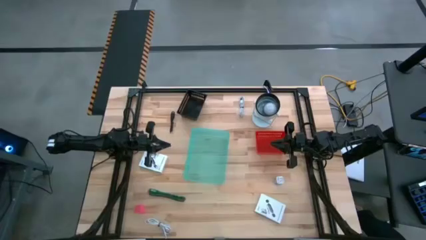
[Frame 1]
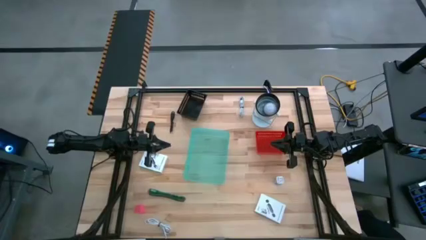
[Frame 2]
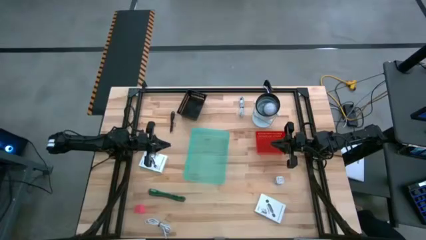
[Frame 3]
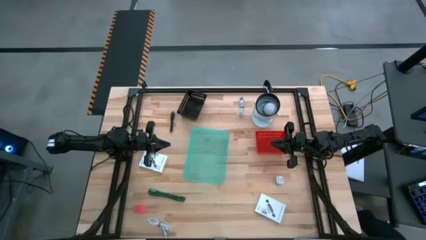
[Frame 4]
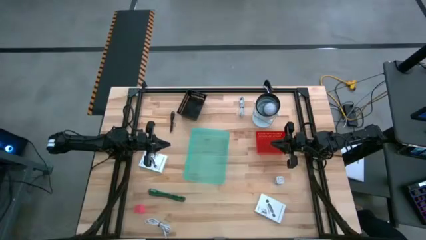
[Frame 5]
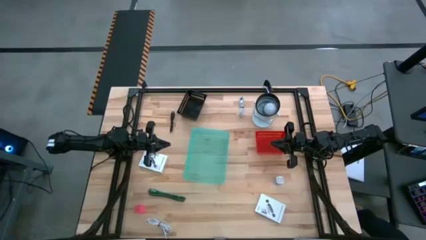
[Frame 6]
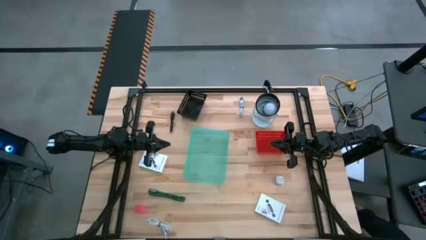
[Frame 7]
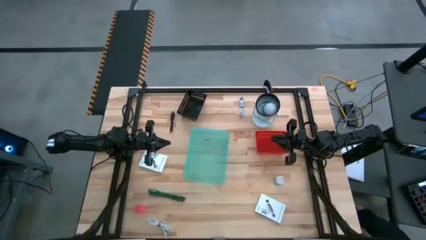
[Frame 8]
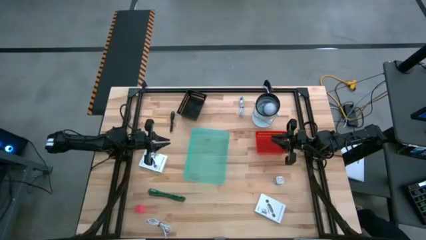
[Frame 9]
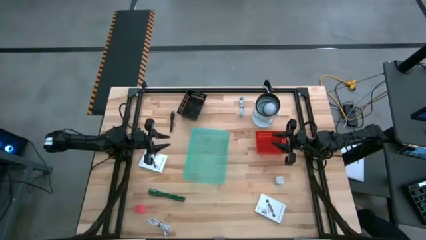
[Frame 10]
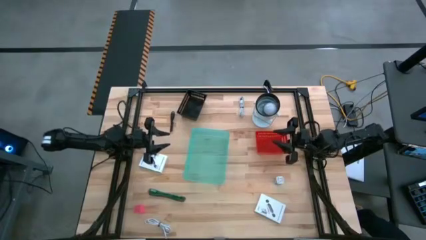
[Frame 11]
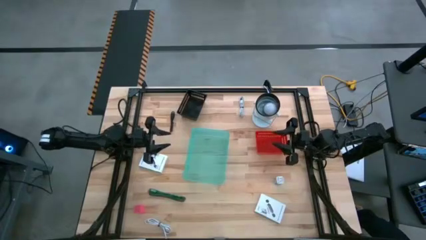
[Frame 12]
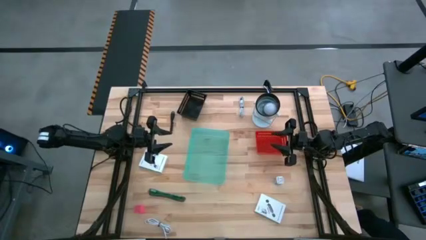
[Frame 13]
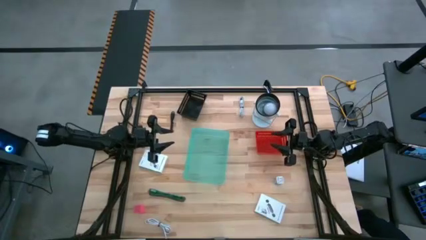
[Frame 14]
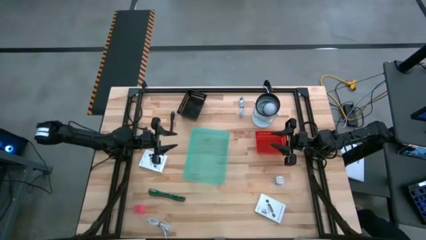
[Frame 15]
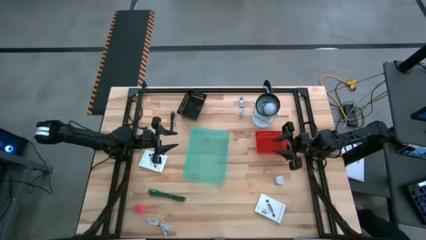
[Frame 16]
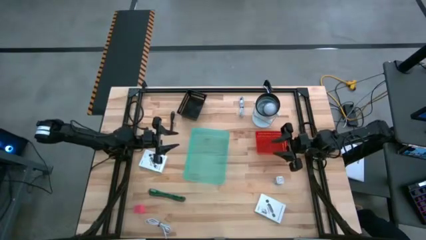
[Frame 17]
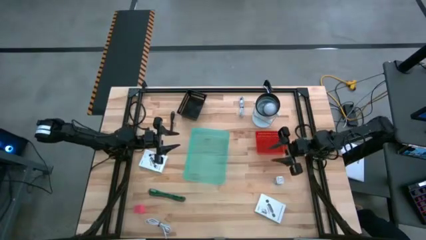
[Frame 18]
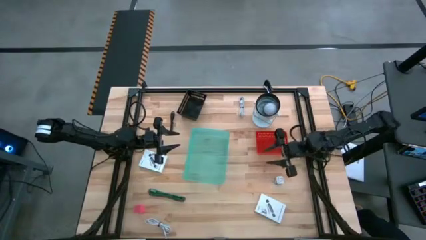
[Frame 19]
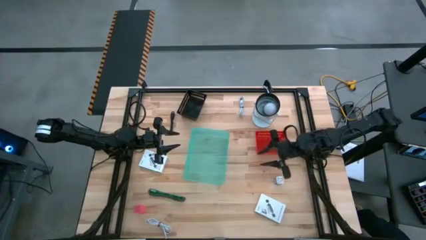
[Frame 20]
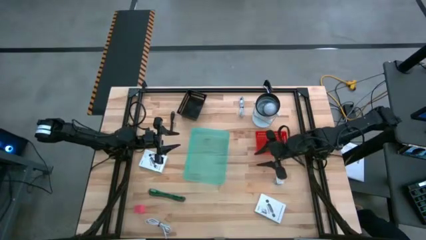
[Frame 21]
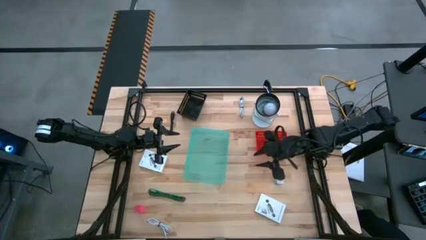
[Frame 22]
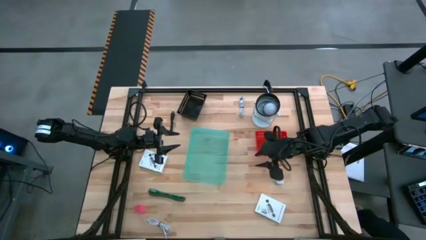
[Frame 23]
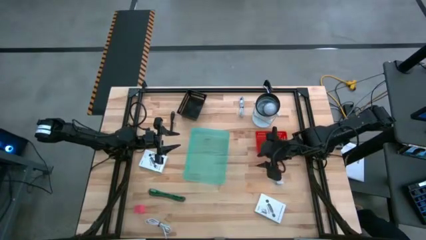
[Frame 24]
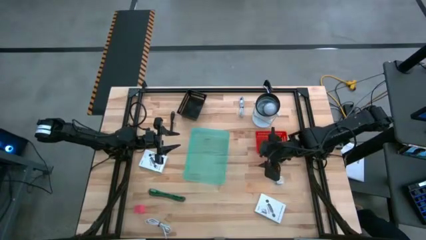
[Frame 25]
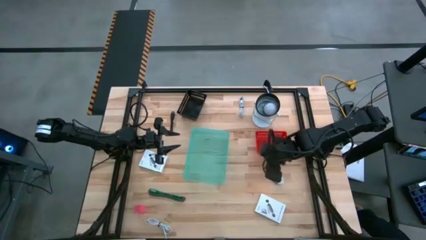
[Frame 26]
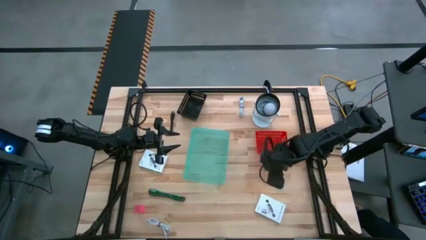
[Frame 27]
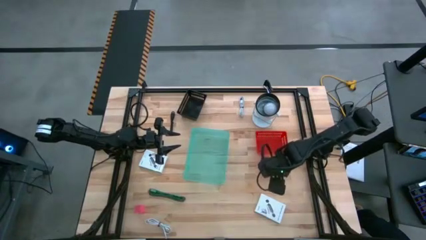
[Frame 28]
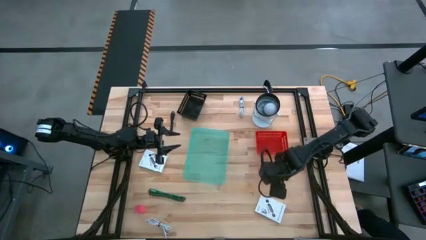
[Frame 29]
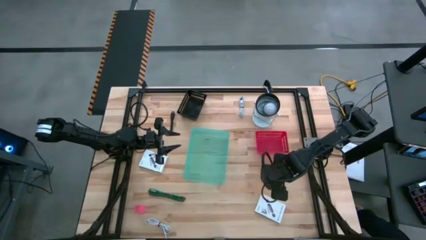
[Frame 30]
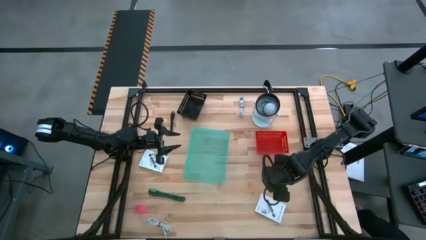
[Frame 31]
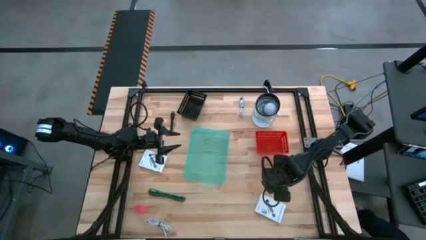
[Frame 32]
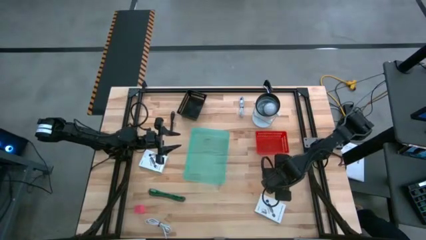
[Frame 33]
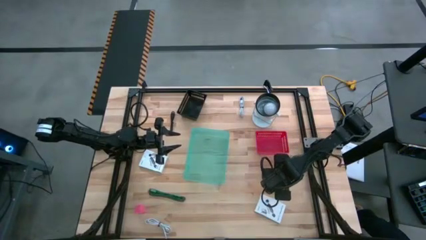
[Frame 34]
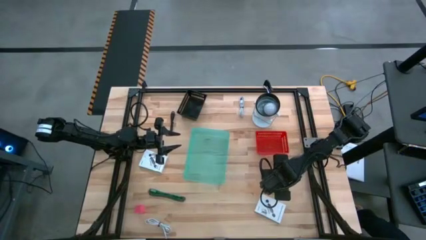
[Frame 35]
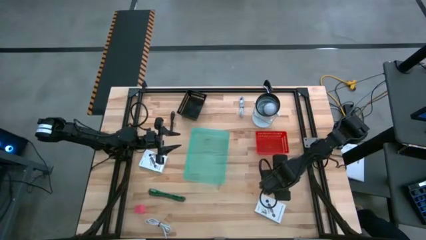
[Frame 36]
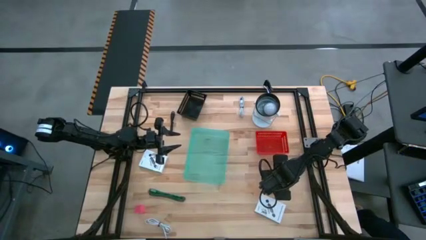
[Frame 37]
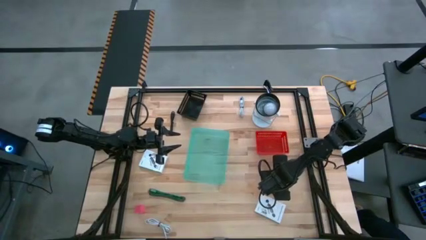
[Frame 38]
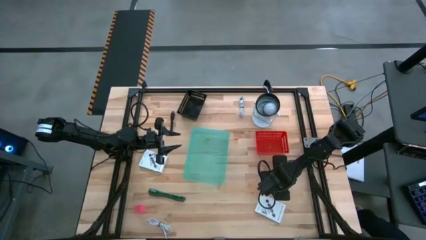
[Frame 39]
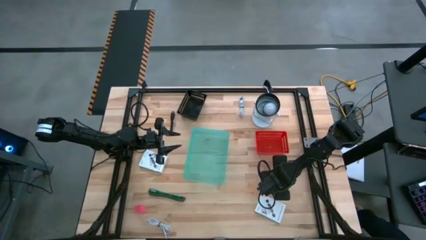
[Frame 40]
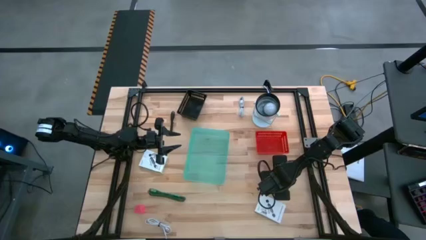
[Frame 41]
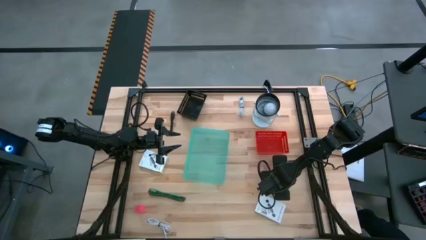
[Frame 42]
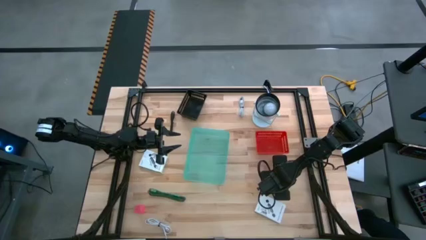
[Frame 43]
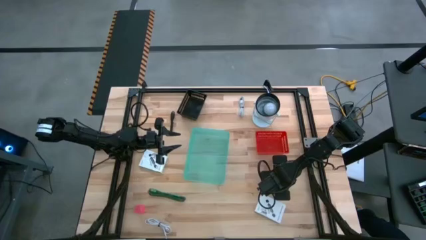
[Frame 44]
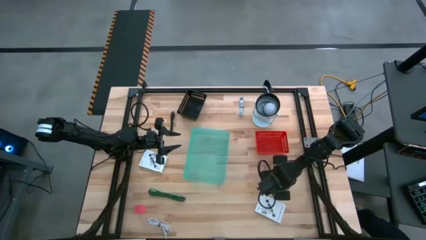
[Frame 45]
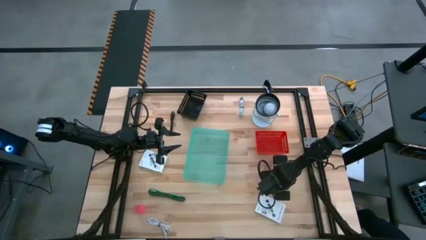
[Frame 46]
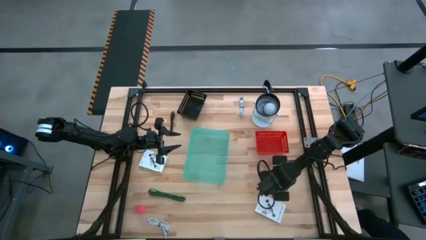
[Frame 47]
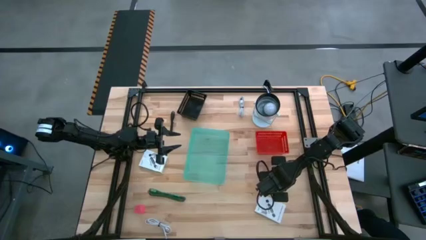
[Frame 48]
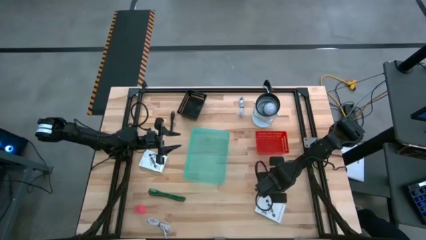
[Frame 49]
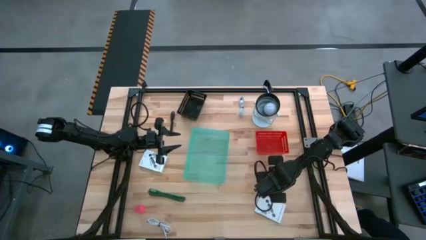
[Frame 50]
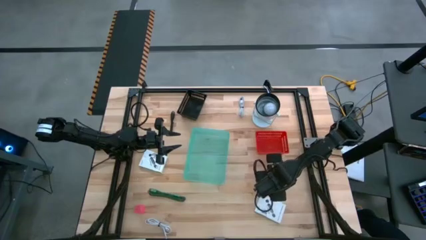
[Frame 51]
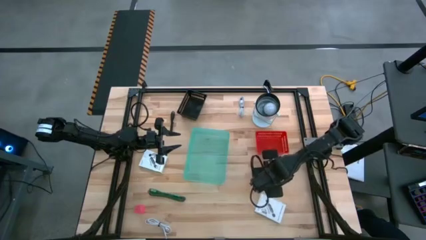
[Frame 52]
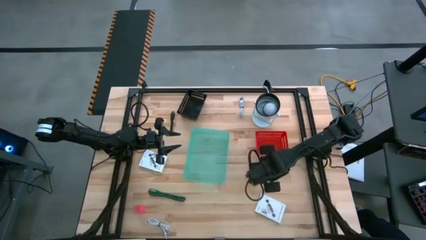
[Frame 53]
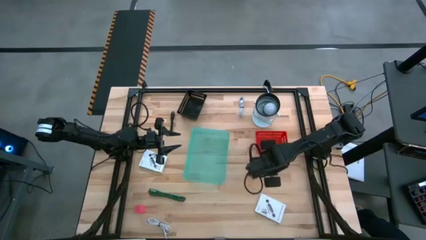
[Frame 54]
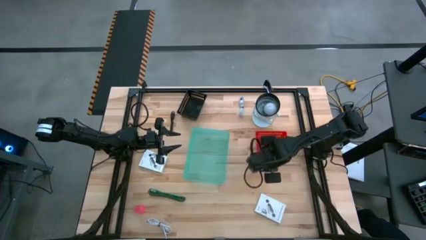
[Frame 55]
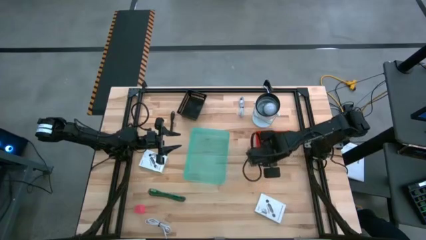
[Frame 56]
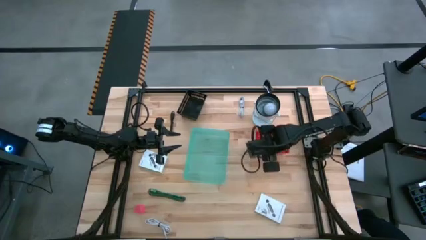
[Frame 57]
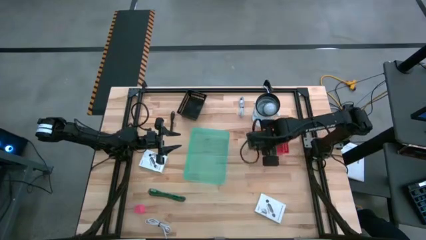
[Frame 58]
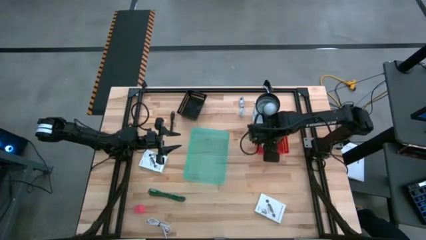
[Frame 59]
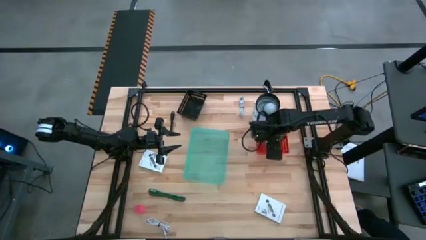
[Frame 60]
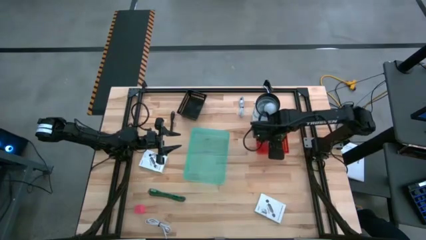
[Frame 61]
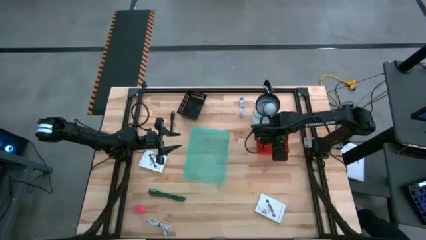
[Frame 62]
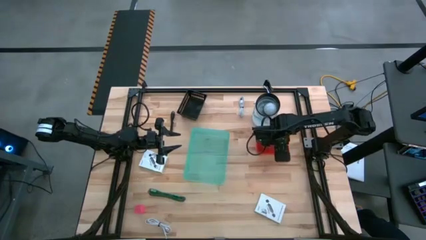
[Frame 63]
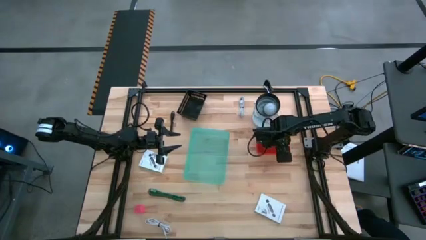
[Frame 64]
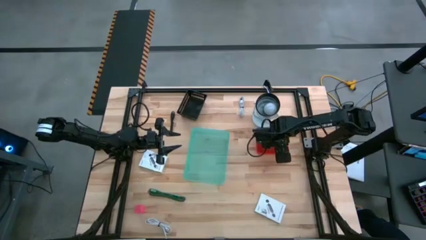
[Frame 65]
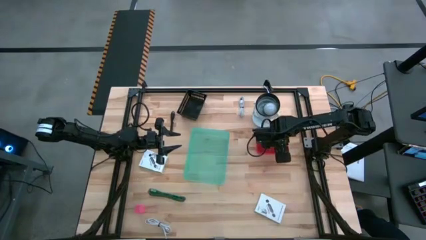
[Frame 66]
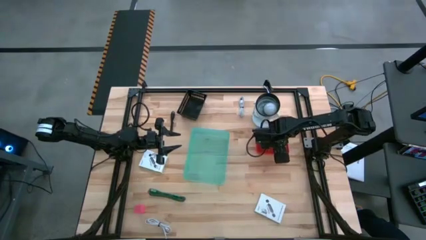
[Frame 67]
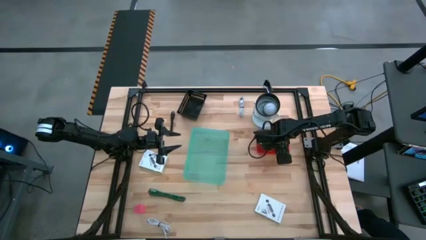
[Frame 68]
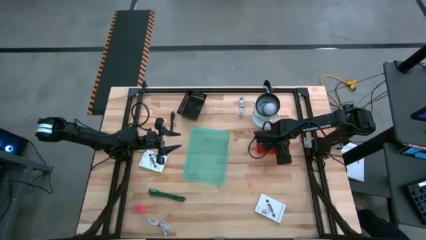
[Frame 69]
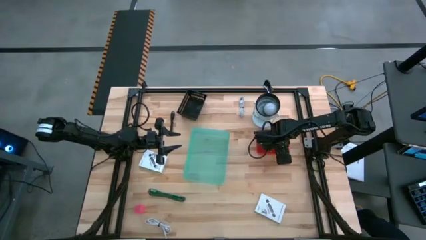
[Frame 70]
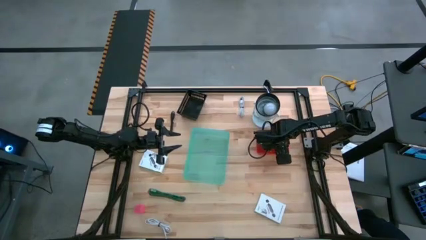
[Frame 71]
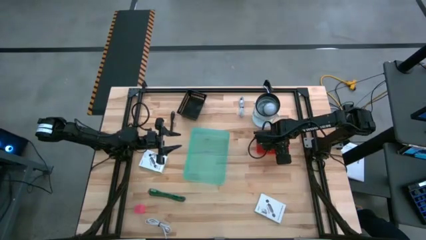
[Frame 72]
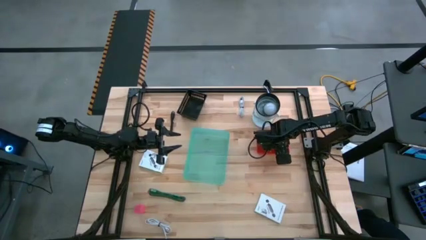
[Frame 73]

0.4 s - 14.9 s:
Task: Pick and place items into bin
Put the blue charger adapter into the red basket
